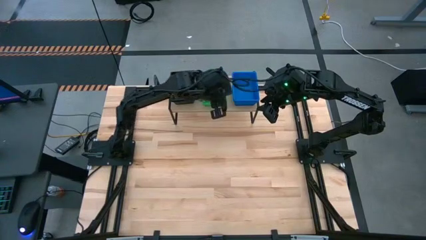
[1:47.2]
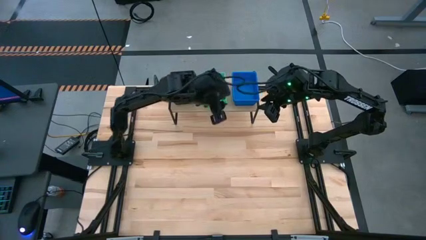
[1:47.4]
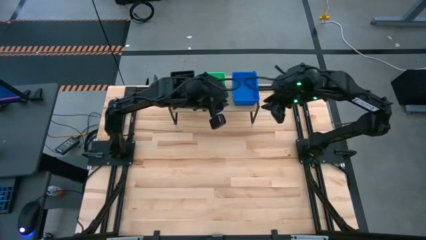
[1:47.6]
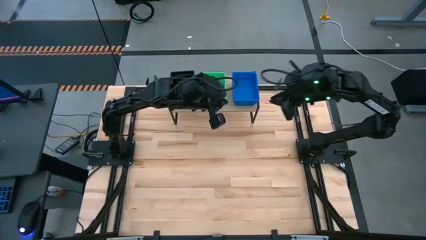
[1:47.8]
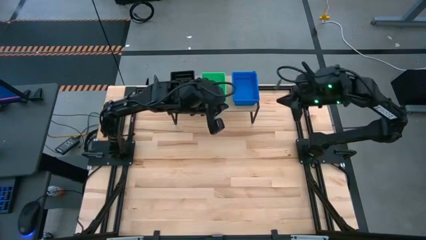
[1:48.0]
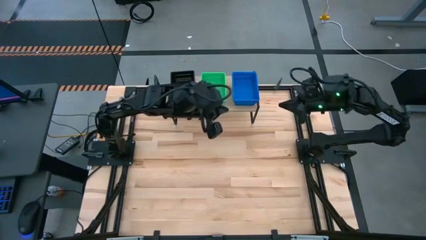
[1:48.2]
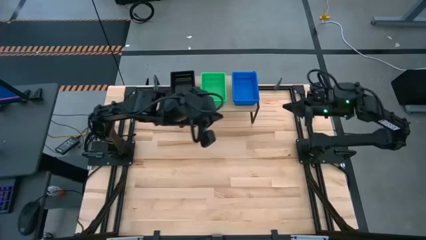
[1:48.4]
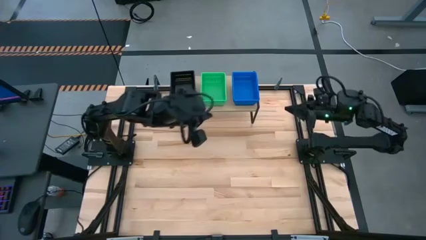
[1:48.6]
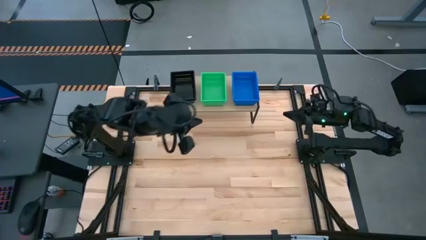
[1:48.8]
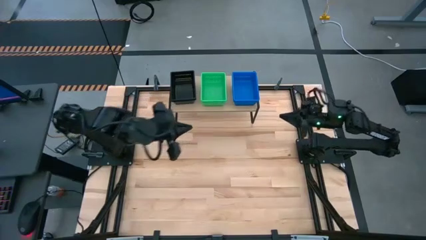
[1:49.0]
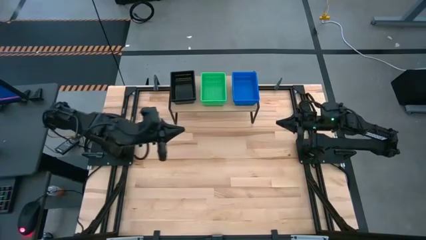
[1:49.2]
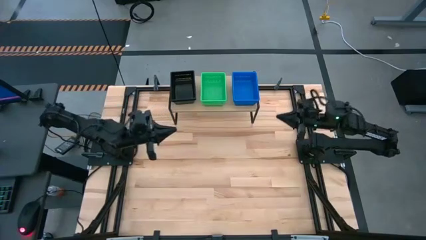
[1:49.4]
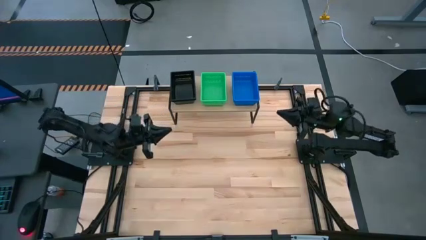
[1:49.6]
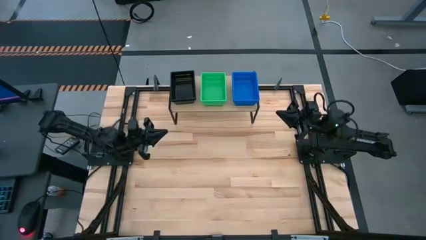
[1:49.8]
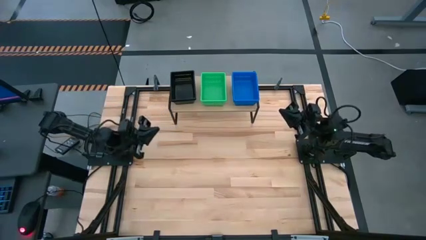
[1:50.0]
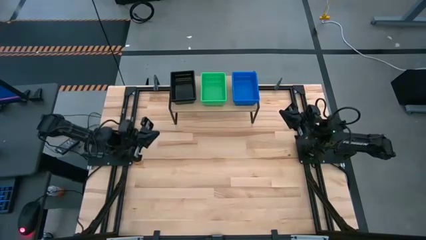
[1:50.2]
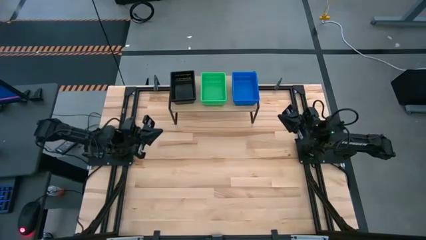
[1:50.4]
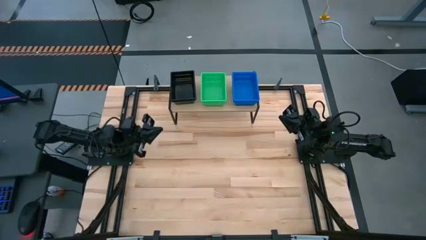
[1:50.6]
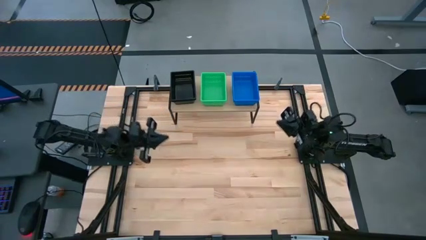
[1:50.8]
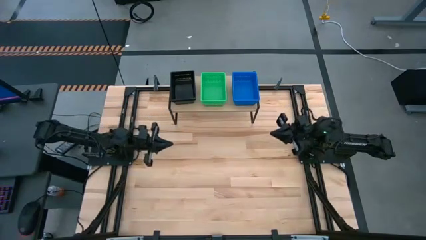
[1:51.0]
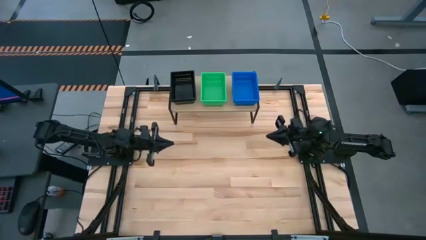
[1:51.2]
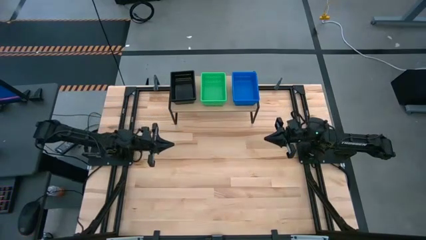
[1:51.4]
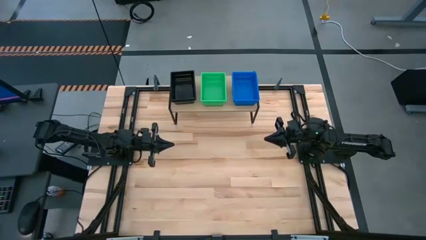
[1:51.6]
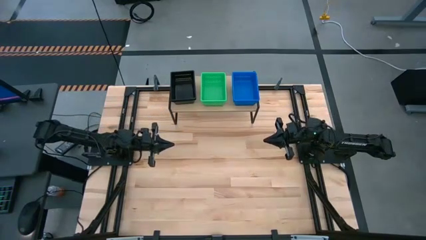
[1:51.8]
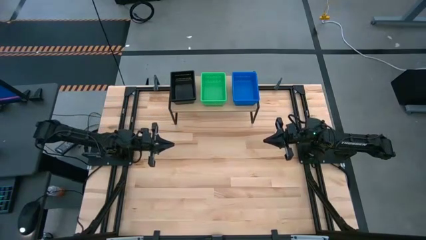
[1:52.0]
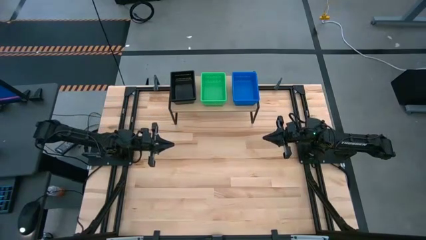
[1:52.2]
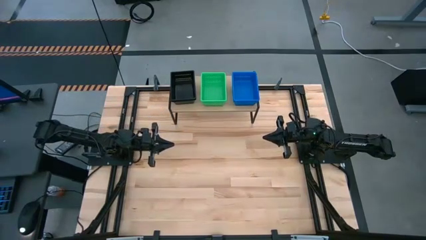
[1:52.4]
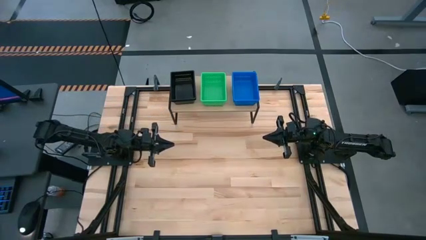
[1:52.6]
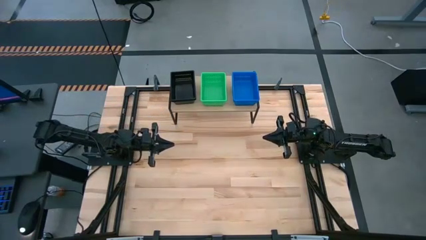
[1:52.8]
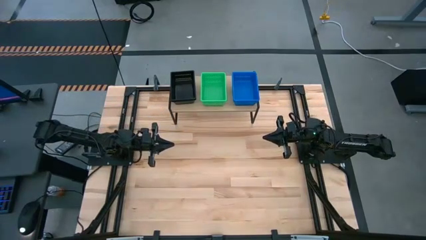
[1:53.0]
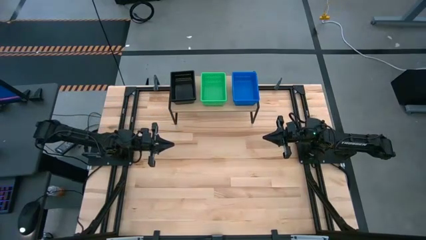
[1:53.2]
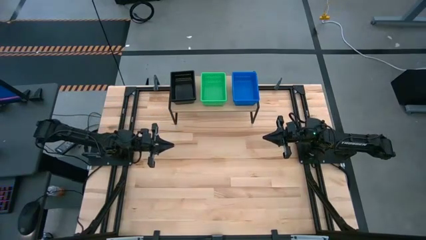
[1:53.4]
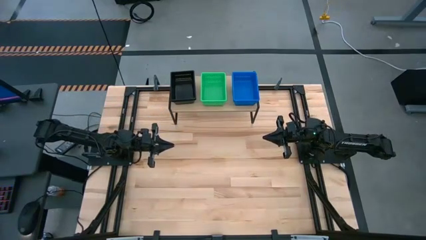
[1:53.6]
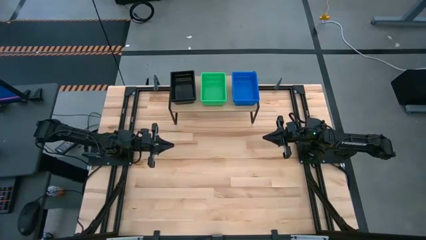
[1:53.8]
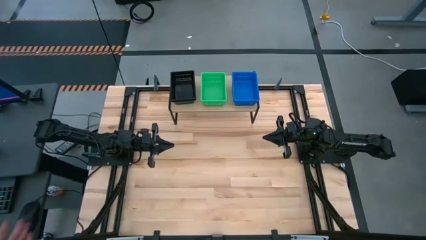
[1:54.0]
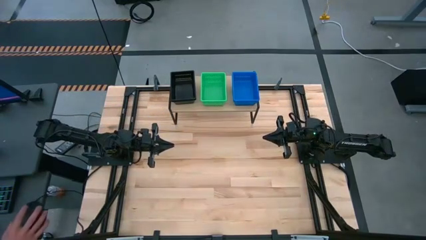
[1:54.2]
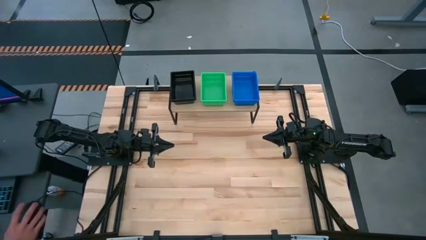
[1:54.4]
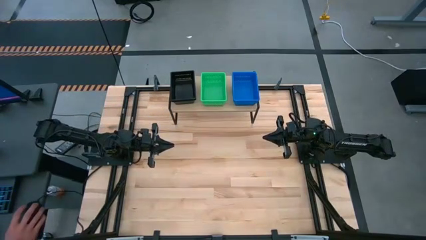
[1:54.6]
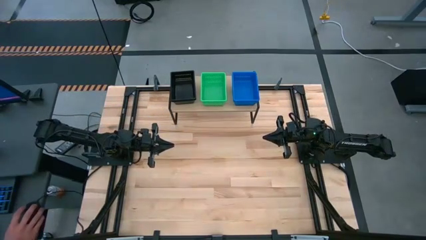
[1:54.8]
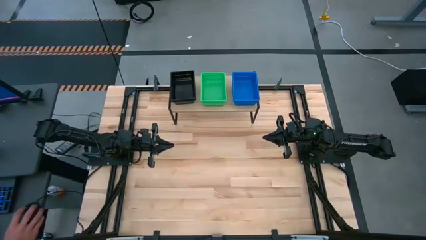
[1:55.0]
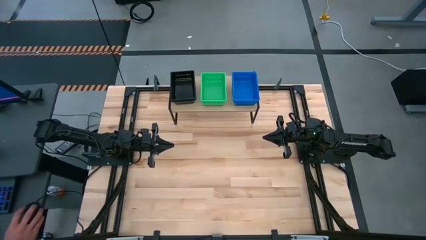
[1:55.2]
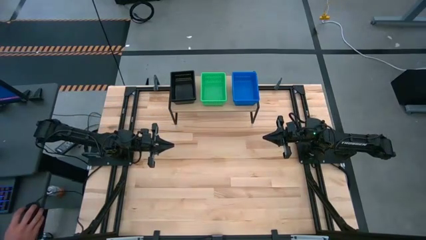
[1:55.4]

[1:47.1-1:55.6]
Task: Stack baskets on shelf by color
Return to Home Position

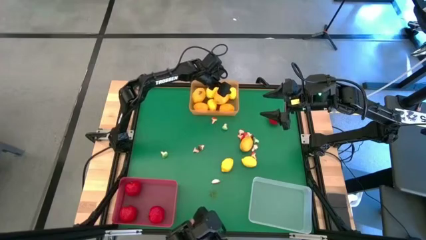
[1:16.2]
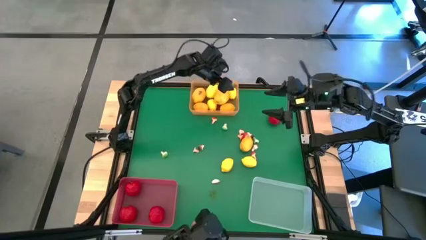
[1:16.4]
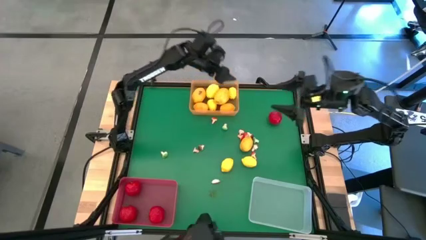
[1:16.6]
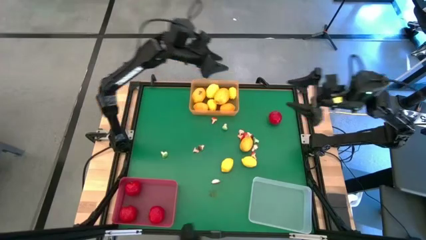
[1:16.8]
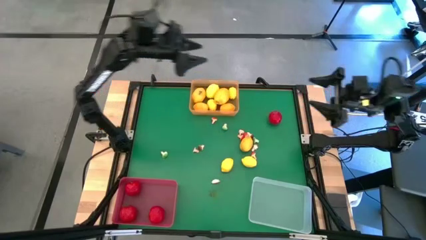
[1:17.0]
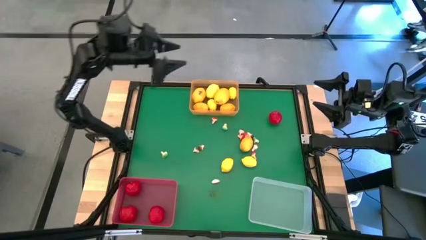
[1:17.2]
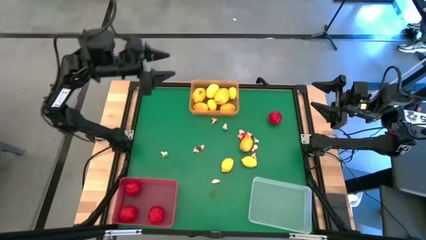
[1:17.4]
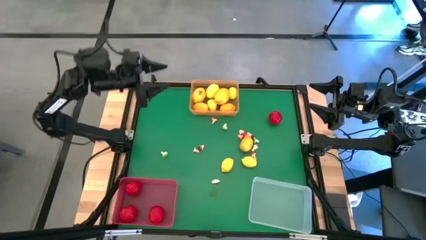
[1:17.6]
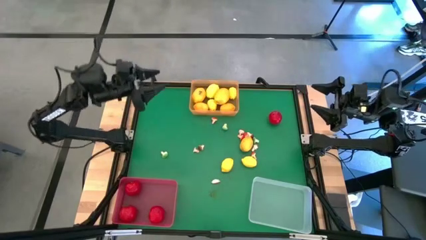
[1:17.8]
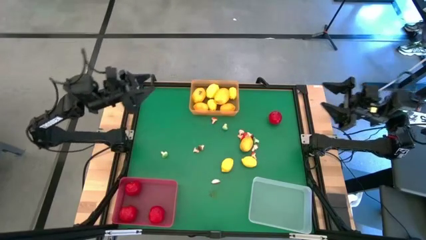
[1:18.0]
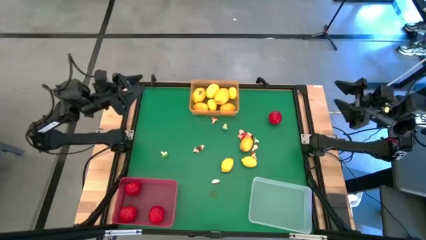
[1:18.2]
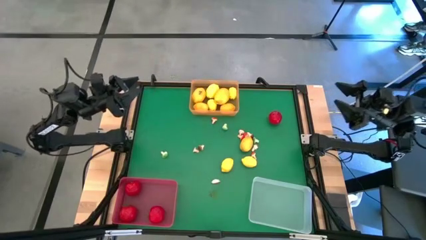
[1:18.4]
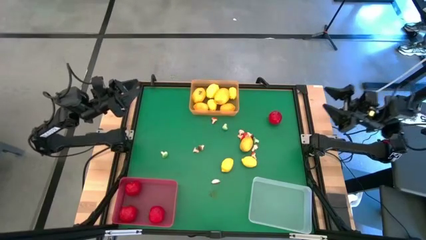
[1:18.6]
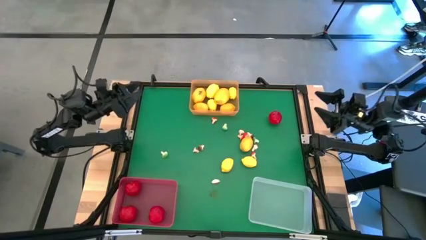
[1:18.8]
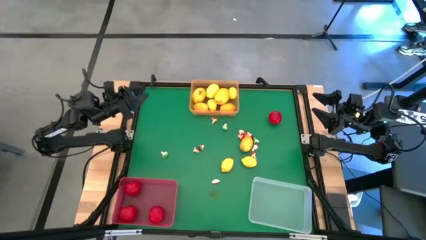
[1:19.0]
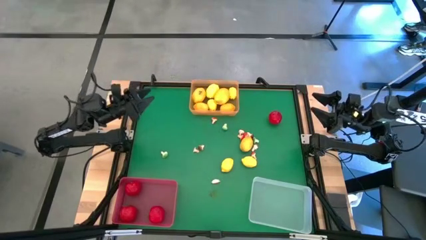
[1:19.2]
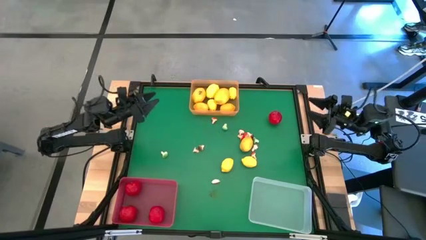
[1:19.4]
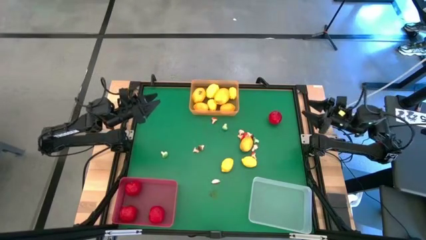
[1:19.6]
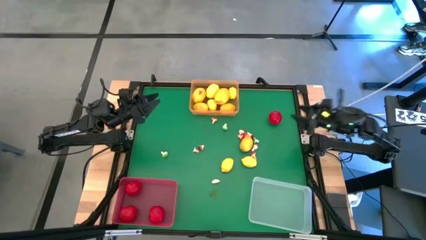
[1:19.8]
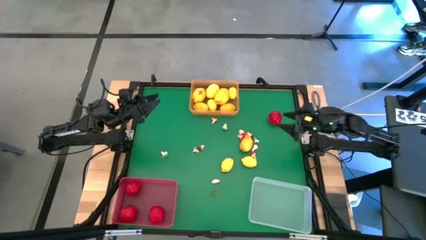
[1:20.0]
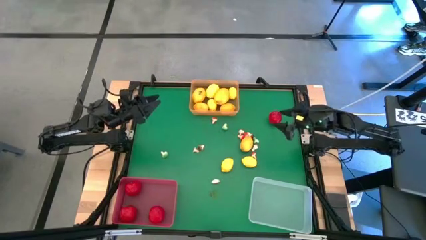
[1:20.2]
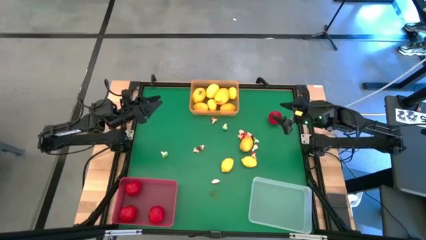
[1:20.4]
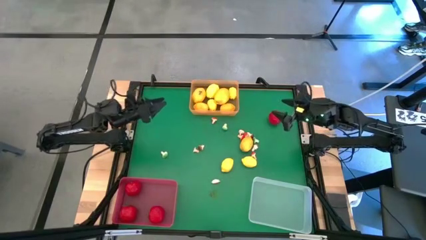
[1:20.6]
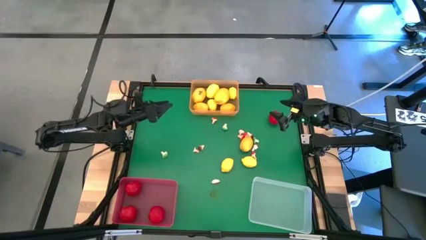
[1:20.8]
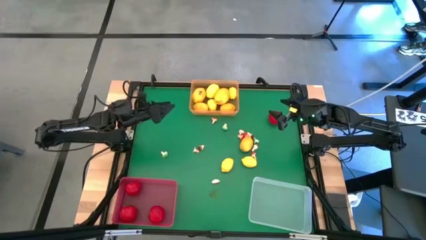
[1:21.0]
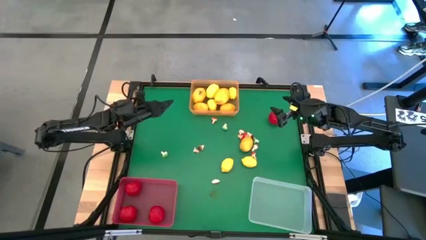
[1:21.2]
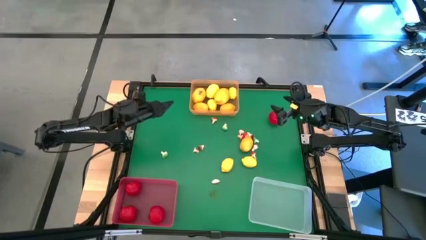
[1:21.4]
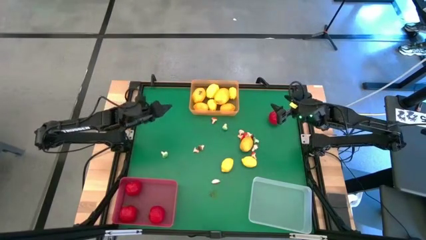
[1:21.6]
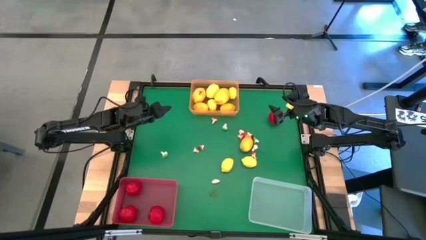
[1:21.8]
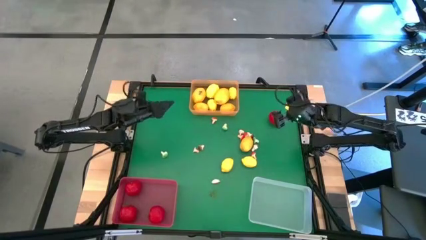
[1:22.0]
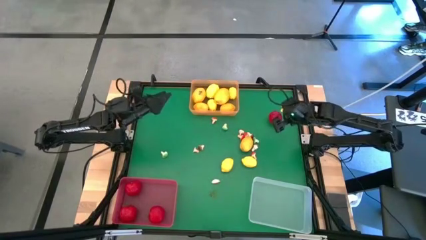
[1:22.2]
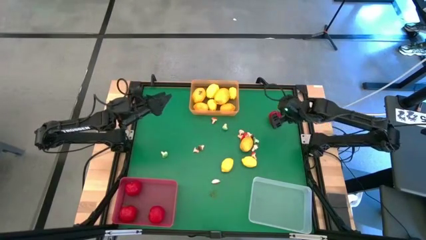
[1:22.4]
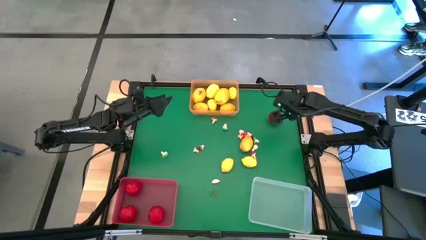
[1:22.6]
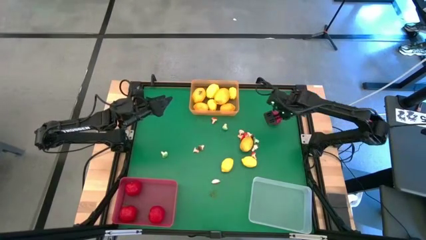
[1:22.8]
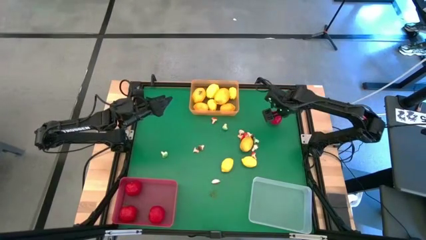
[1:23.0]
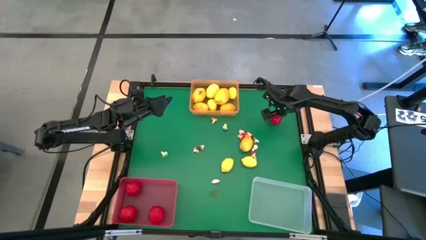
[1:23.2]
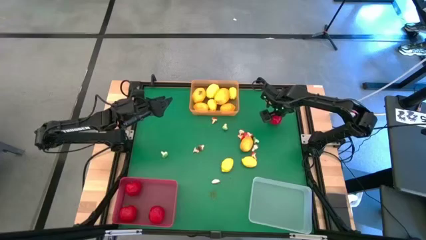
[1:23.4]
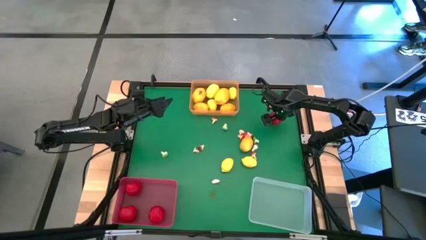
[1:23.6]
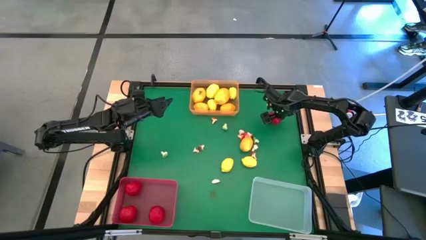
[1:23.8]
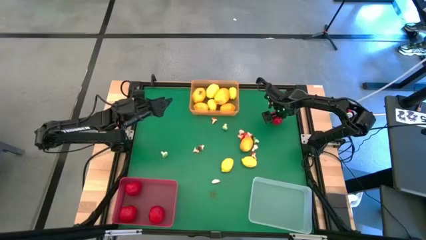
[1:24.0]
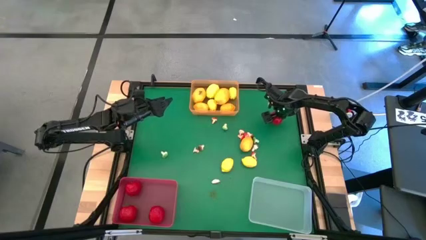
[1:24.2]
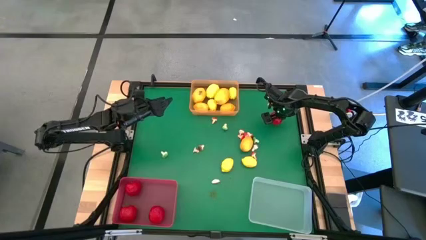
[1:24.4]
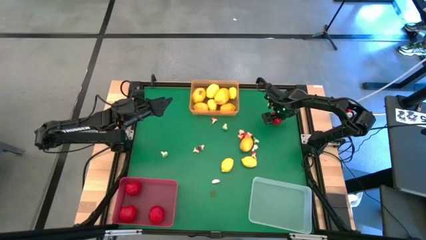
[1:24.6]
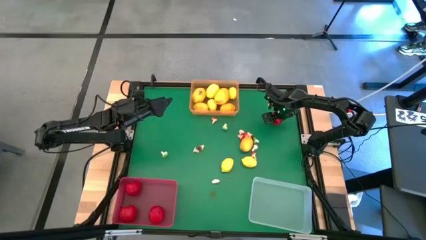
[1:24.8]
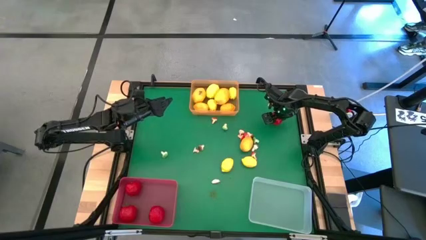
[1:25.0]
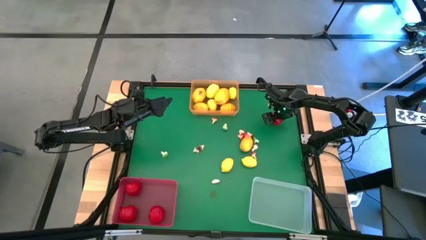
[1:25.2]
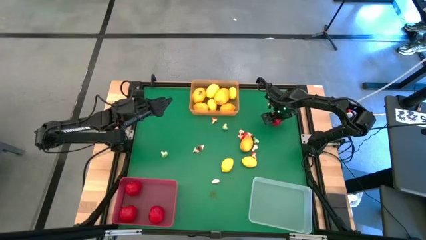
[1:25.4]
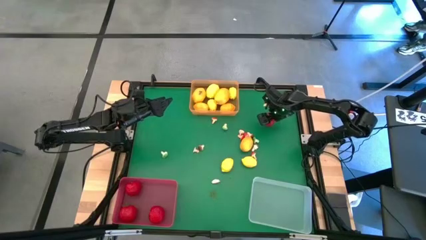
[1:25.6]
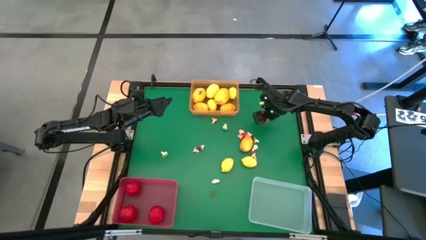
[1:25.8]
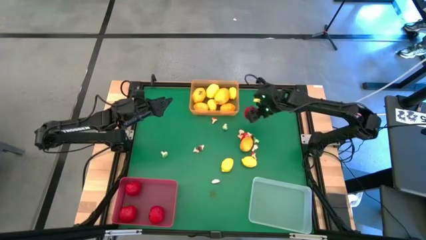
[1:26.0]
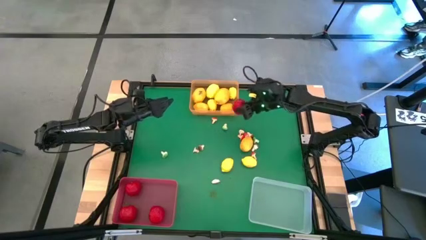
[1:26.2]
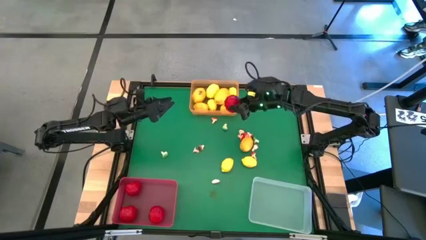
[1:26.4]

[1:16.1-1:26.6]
Task: Sort produce into baskets
Put the tomato into the red bin
